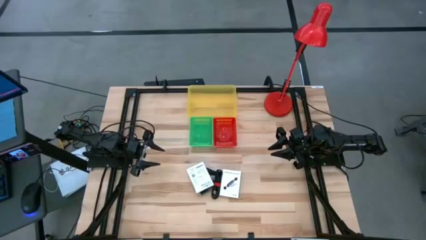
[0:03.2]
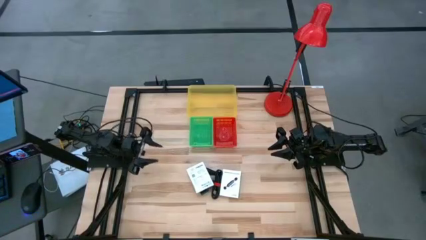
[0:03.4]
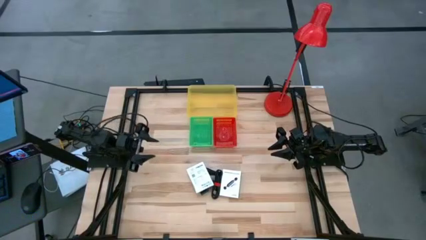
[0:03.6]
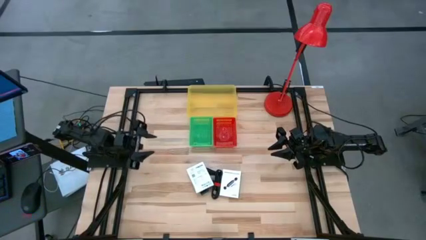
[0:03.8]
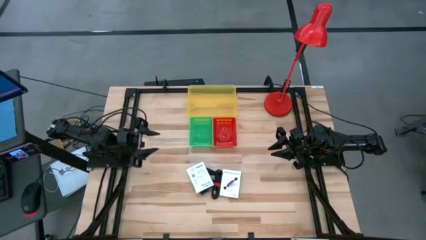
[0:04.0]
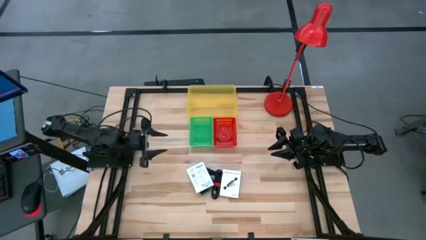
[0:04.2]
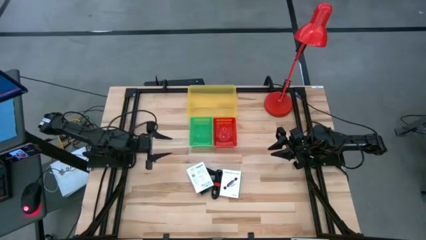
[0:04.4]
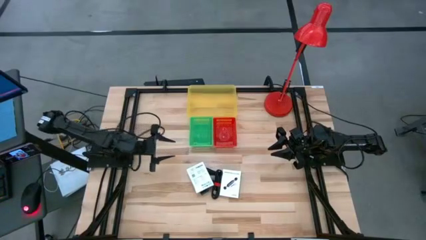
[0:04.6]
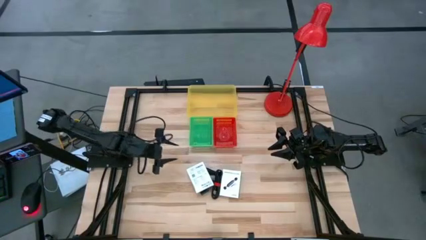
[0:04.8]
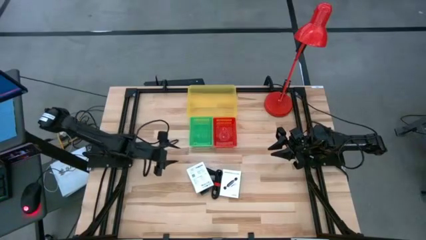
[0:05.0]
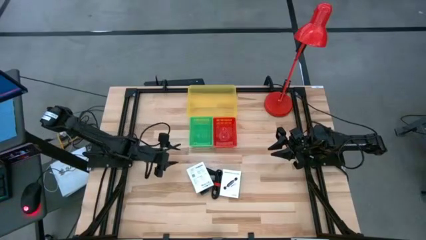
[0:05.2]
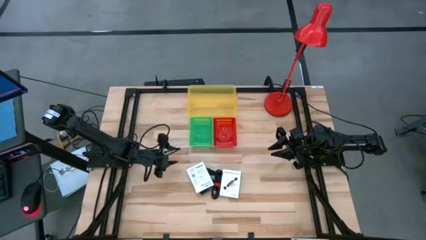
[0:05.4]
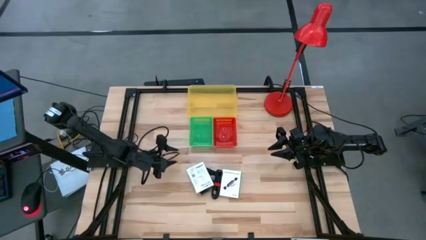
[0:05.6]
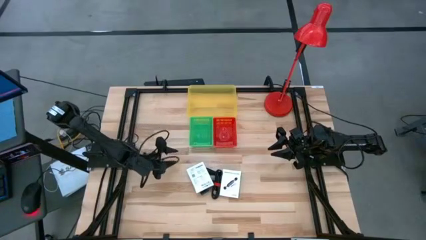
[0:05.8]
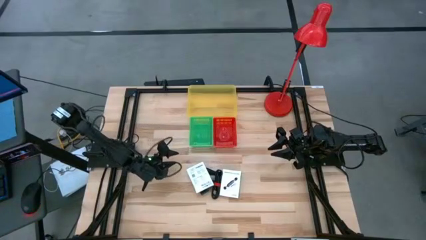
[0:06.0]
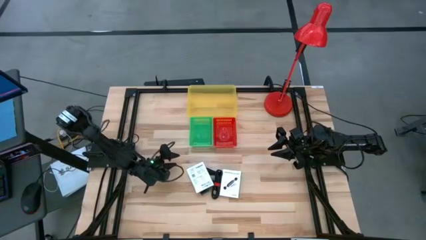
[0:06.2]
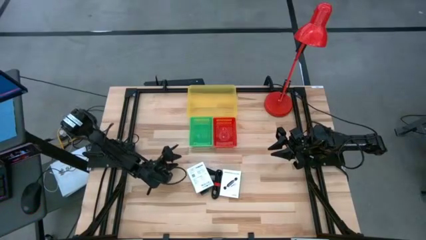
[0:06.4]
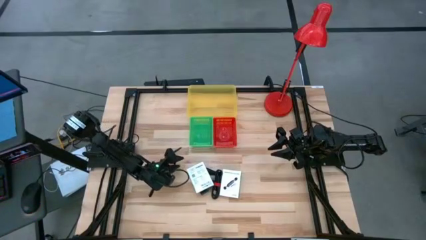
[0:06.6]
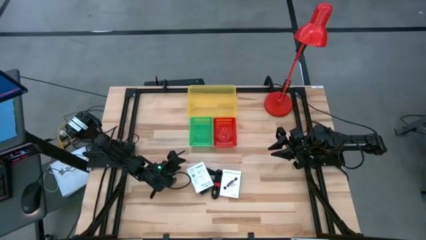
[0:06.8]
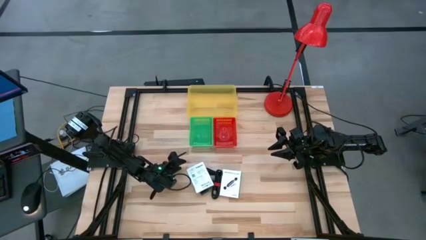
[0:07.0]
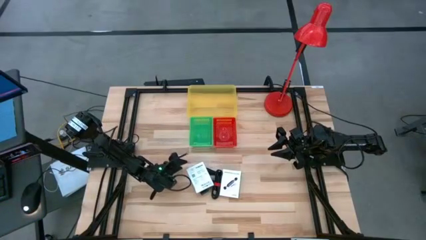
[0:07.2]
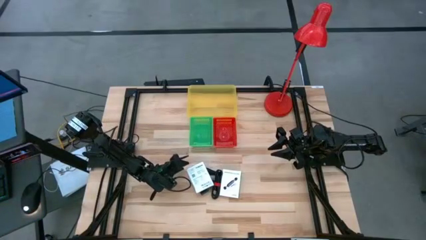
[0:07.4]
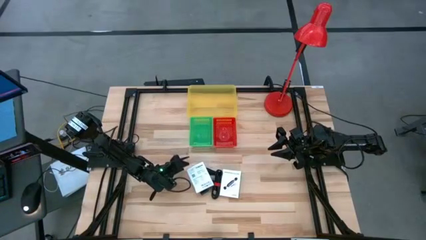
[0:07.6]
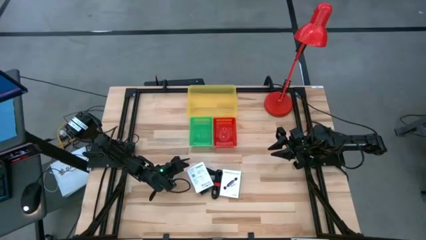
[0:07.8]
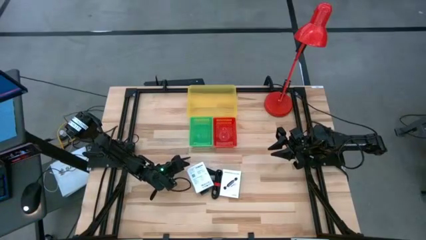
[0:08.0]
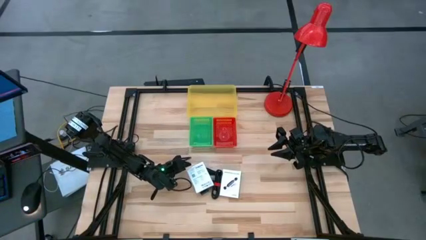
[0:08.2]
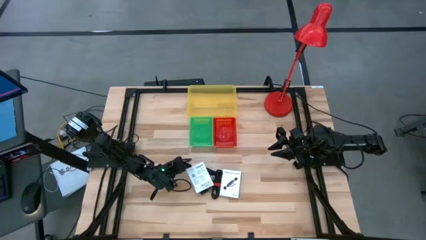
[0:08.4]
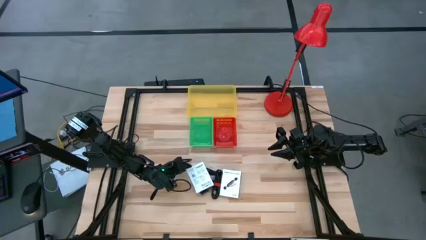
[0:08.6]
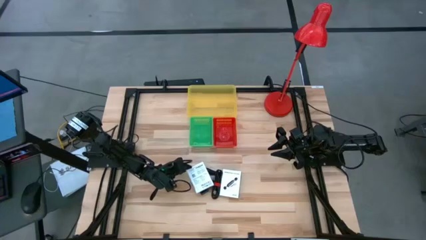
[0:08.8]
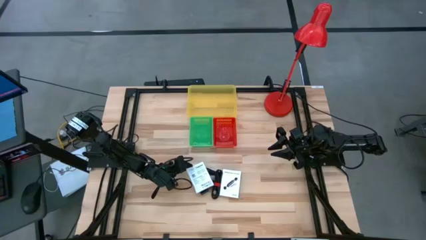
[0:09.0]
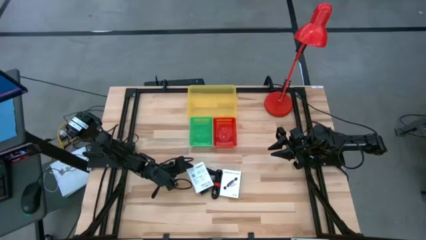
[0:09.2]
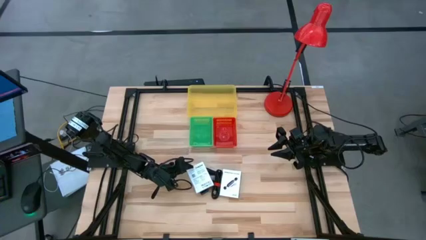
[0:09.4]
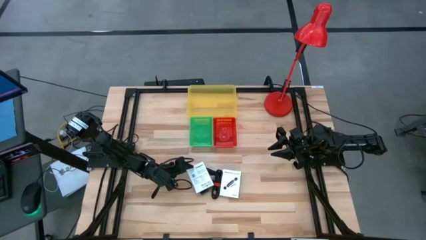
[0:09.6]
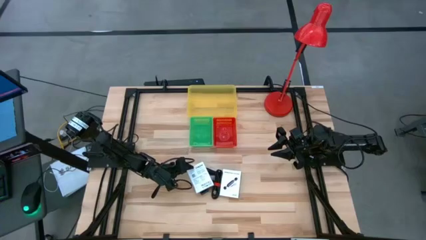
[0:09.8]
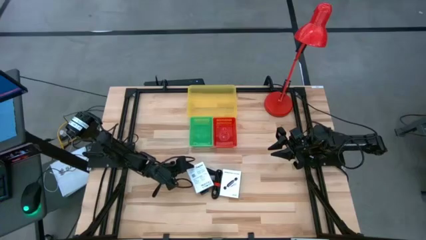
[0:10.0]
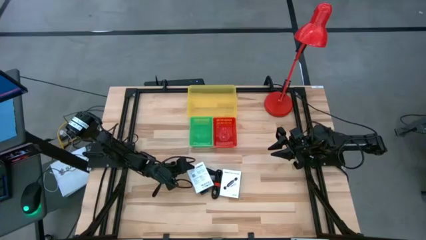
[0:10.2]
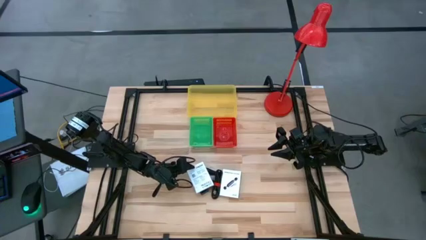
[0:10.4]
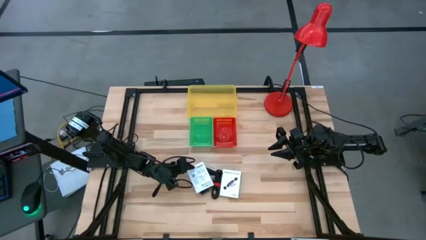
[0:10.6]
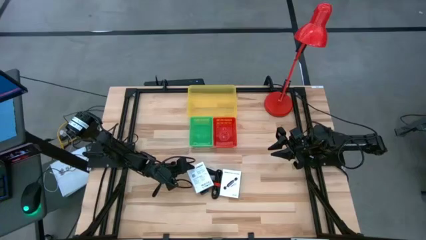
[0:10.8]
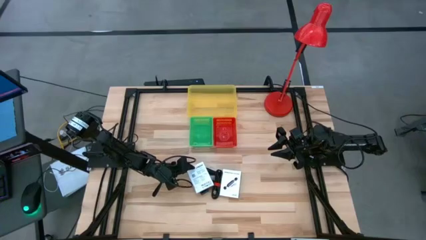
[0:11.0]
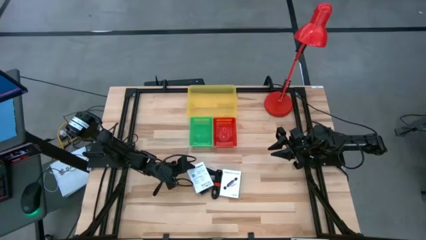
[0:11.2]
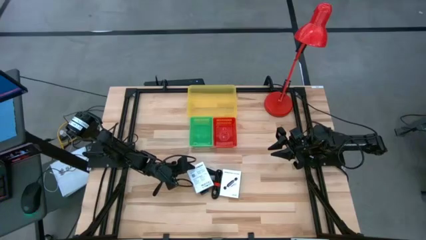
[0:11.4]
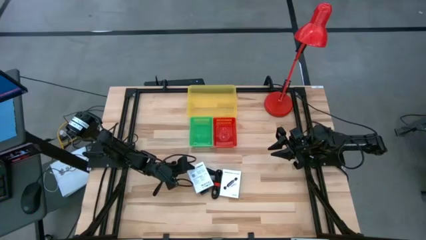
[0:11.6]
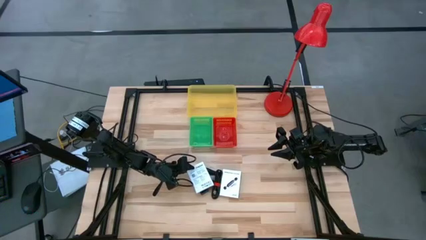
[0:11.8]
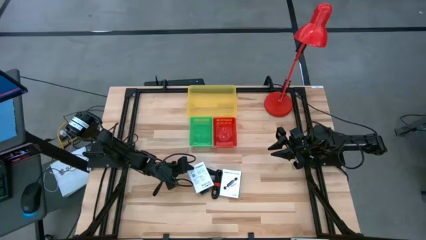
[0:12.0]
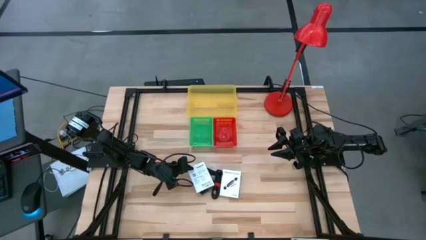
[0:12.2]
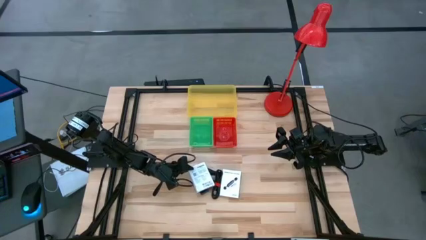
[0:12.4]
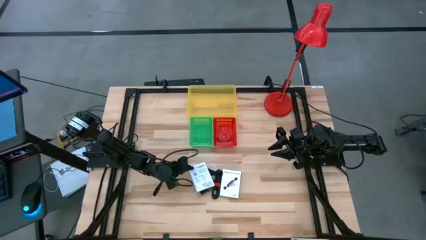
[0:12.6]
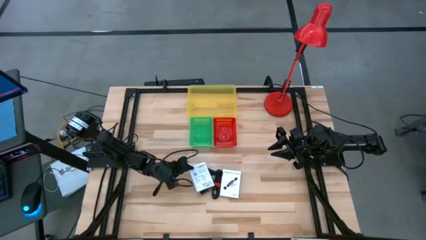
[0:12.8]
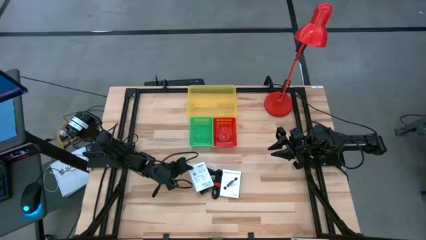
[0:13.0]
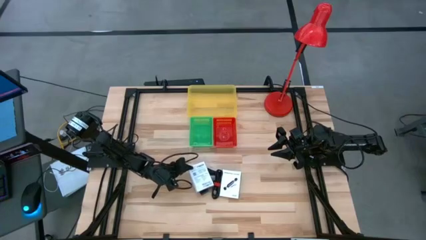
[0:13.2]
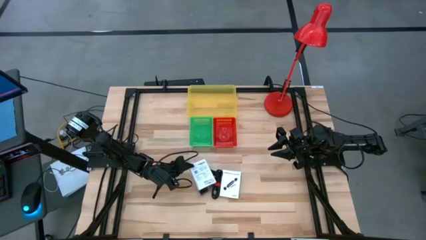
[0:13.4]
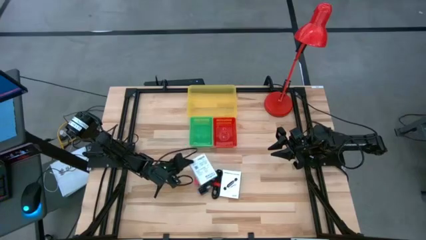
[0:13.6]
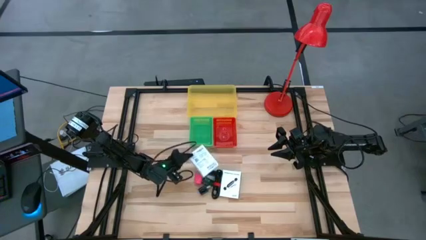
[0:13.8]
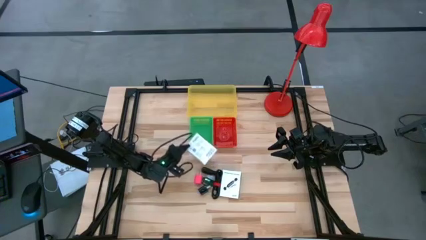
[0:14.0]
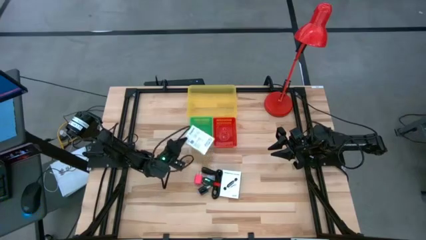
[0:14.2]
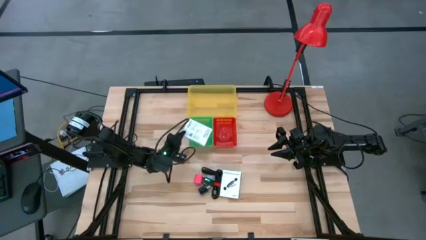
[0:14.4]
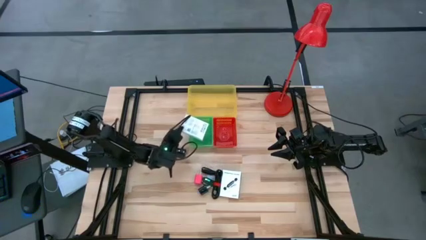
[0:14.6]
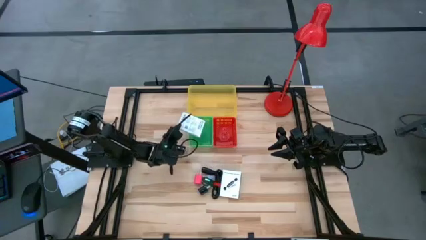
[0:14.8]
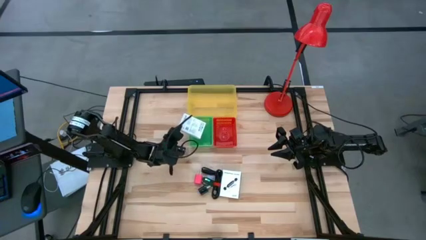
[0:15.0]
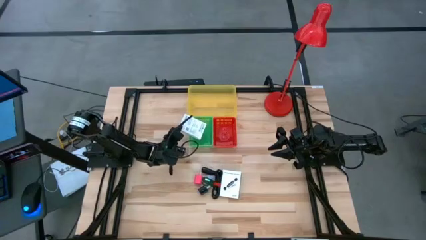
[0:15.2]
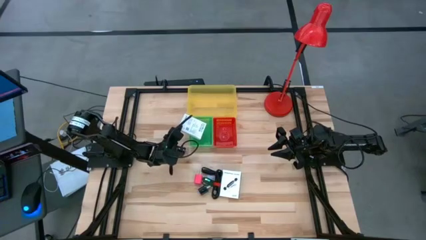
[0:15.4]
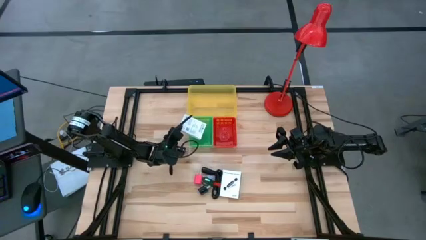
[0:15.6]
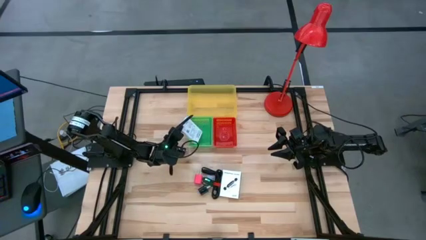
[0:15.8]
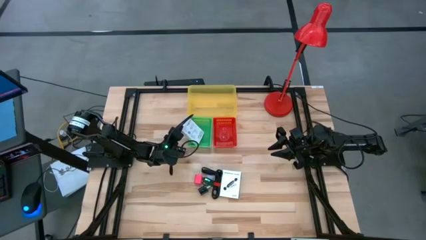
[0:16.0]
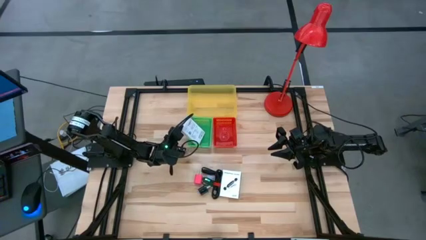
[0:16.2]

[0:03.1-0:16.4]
Task: Pick and place items into bin
Put the left white box card reader into the green bin
